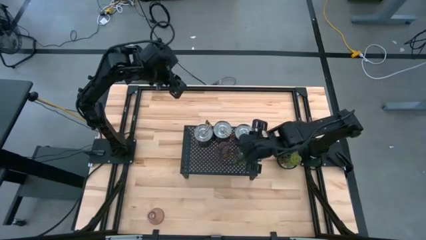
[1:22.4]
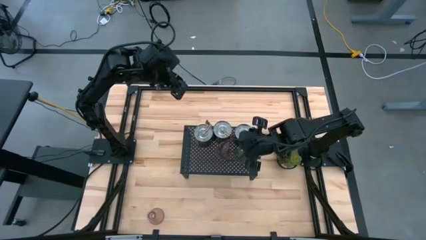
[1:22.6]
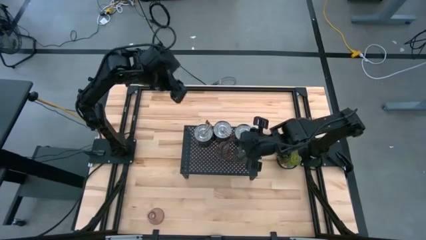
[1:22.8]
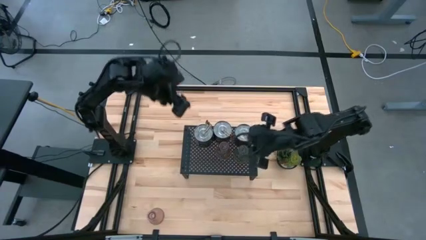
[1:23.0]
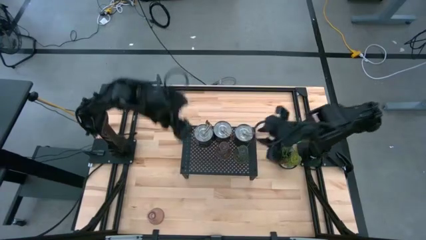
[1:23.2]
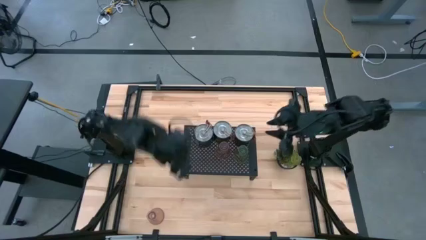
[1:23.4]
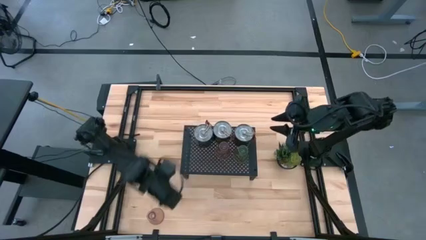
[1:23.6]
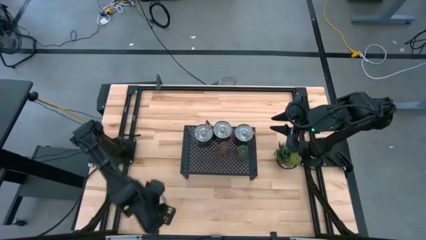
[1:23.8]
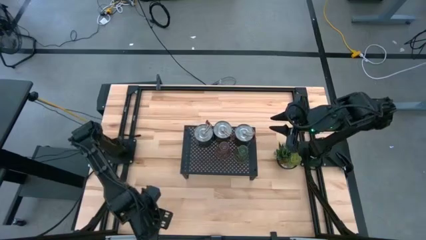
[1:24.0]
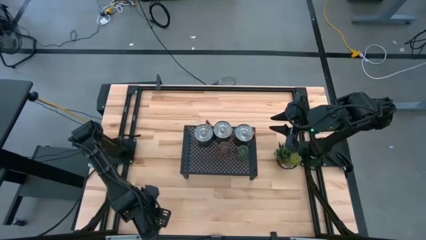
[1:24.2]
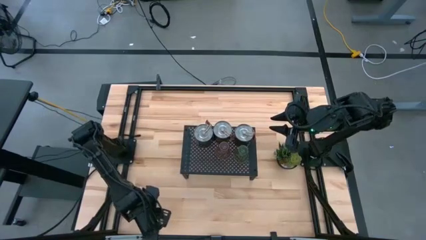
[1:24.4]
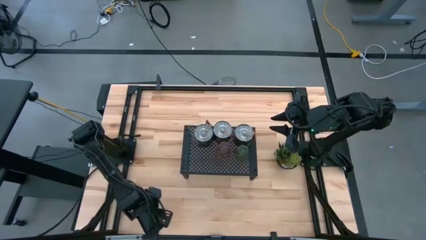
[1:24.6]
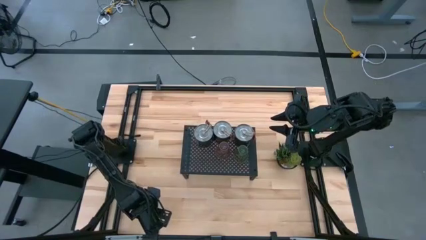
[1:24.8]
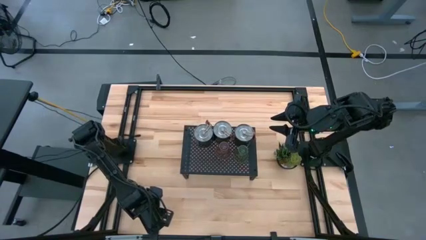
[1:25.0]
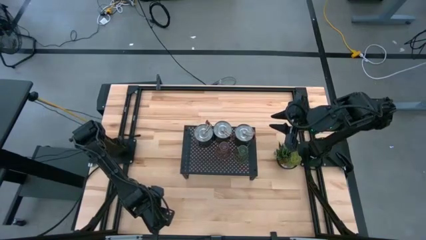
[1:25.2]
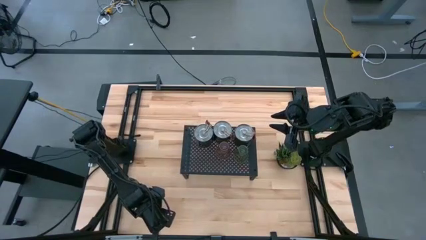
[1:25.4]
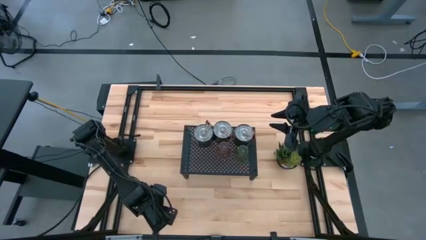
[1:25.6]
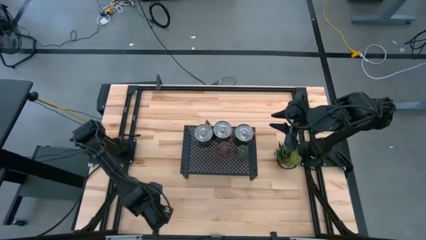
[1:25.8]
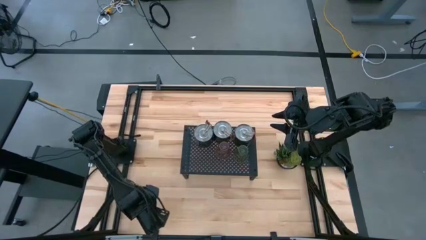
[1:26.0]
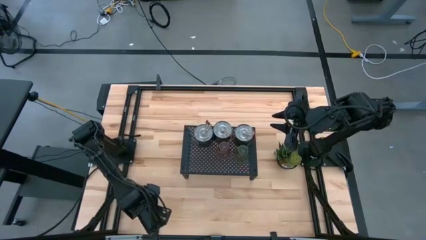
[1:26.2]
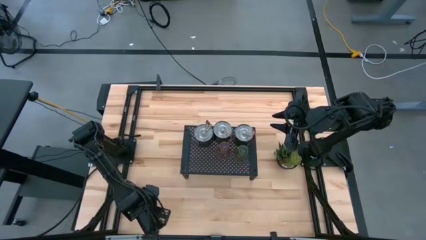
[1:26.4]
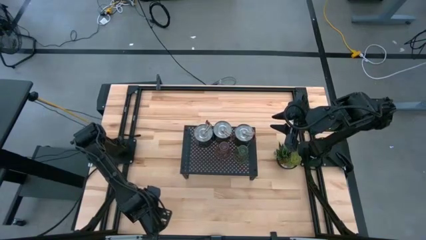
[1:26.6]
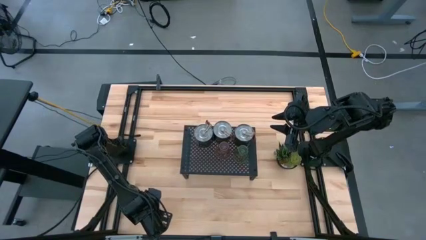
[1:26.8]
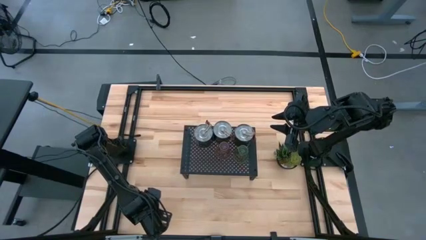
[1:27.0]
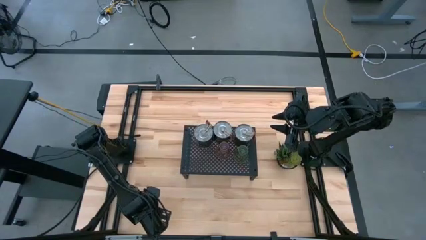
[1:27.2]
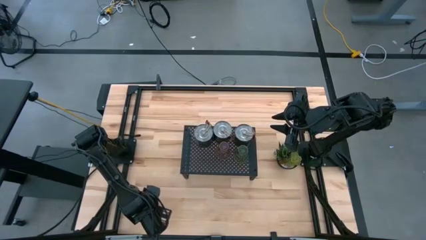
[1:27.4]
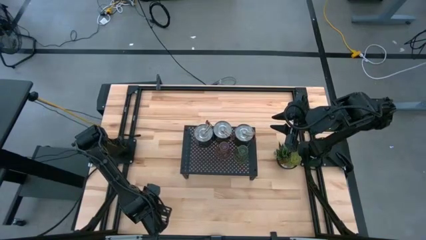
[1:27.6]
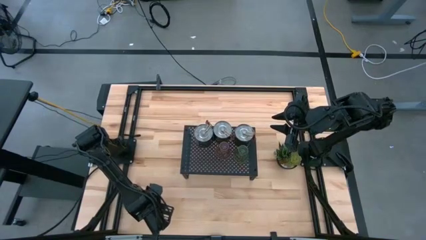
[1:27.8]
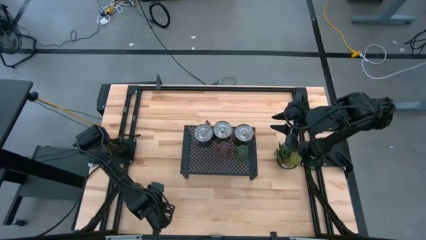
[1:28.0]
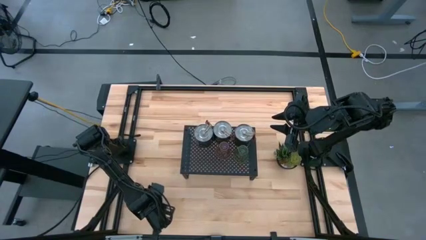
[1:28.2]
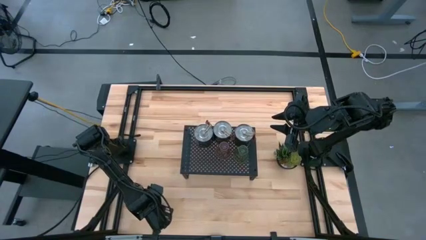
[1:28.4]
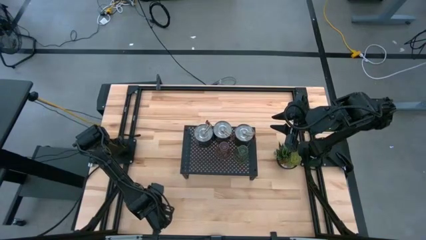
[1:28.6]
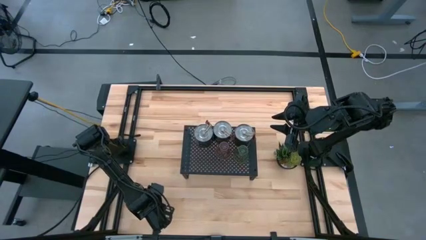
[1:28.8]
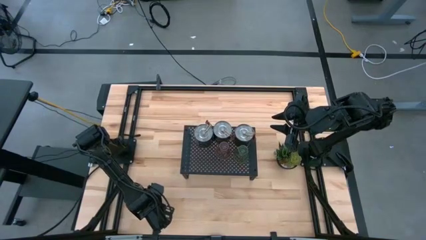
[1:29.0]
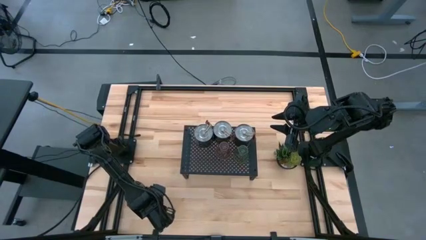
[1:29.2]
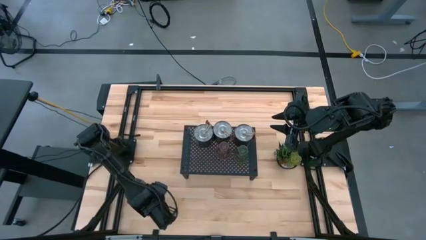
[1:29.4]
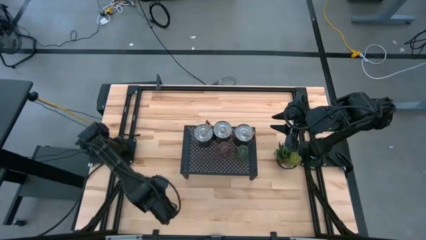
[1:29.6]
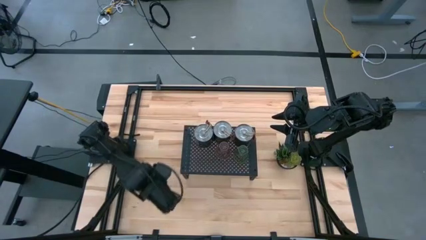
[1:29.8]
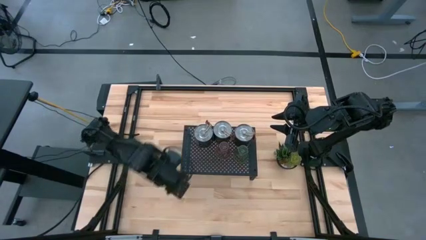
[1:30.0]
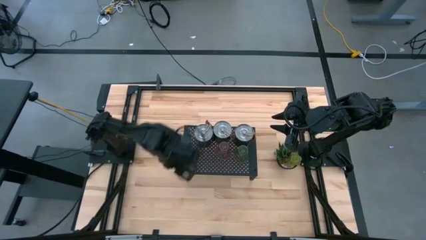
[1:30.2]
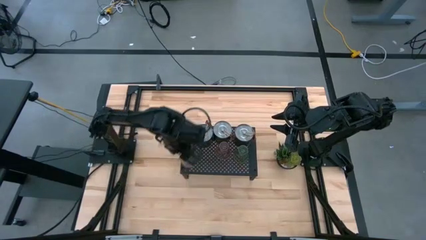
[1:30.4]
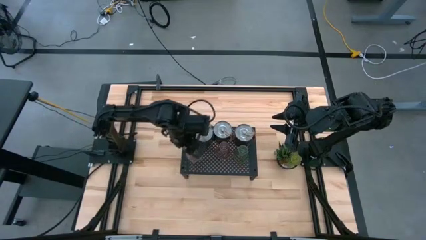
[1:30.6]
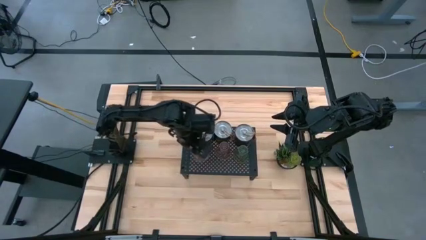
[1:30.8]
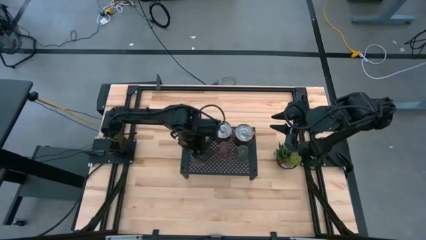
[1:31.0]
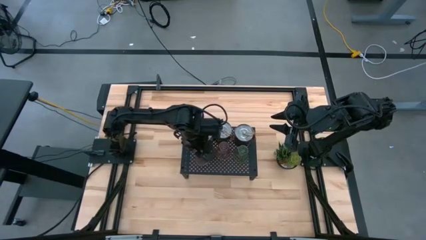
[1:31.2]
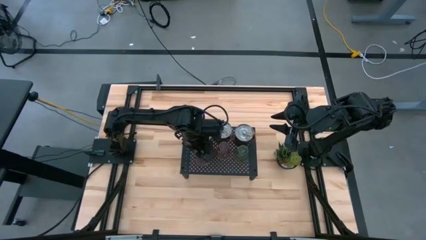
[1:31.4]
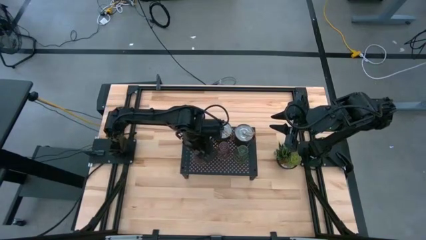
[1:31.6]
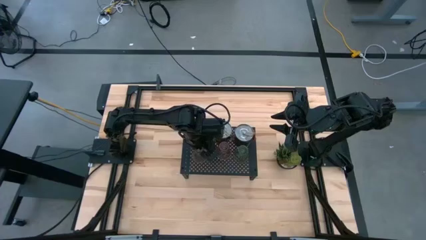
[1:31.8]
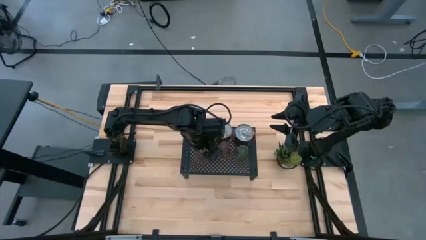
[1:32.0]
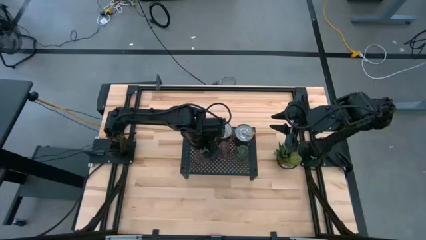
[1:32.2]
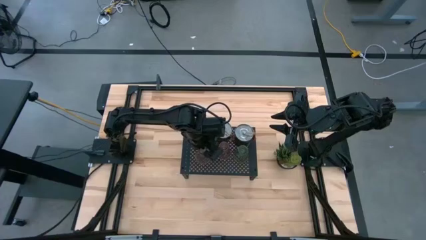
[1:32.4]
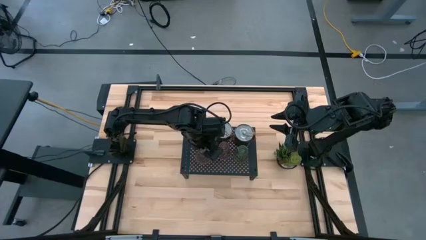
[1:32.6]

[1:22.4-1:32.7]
Task: Pick & Place candle stick holders
Put the pink glass candle holder on the shelf aligned with the other glass candle holder

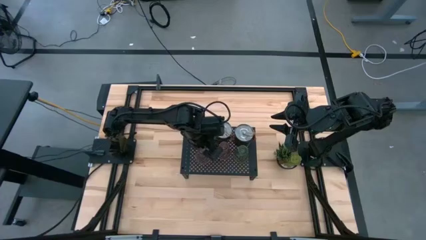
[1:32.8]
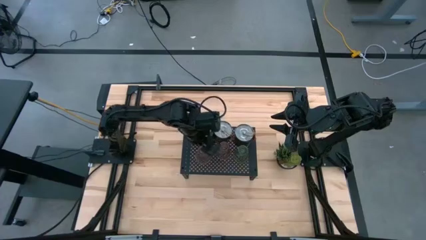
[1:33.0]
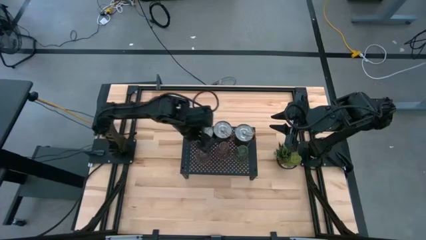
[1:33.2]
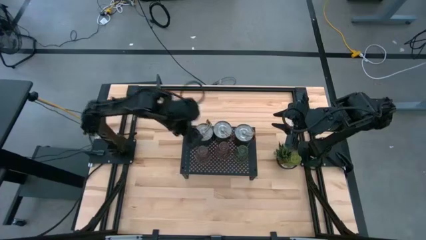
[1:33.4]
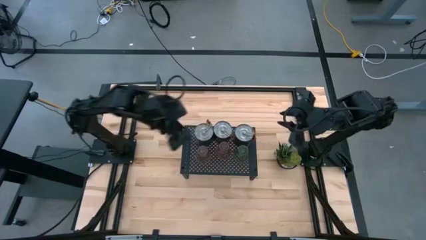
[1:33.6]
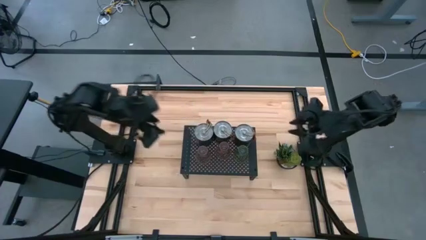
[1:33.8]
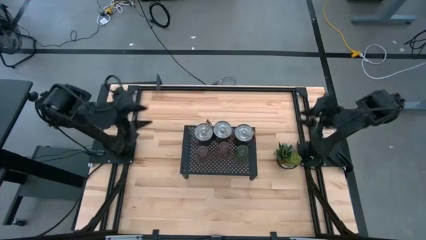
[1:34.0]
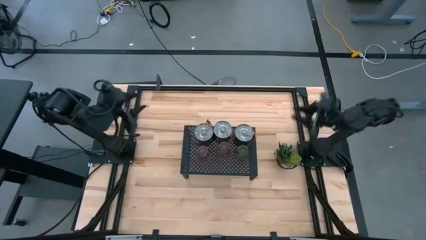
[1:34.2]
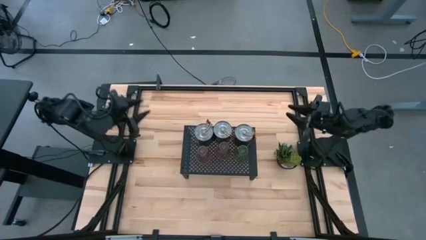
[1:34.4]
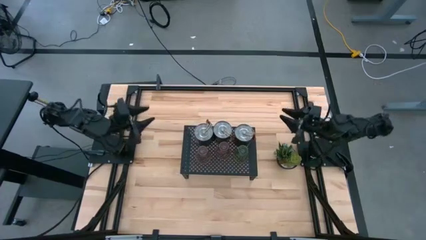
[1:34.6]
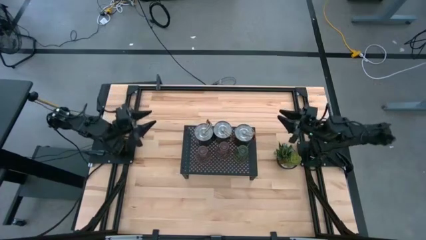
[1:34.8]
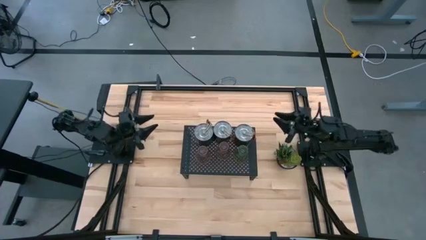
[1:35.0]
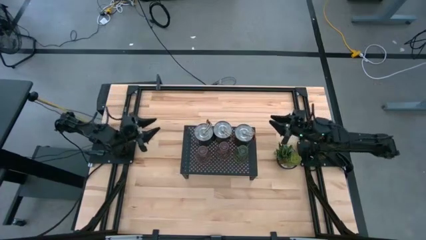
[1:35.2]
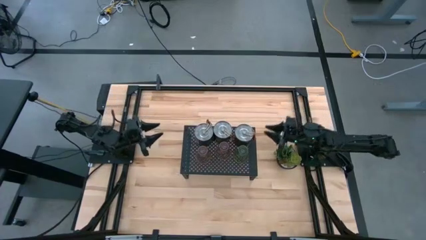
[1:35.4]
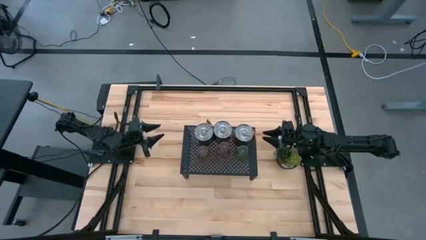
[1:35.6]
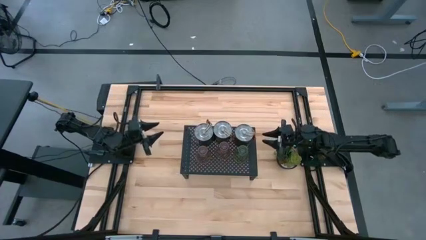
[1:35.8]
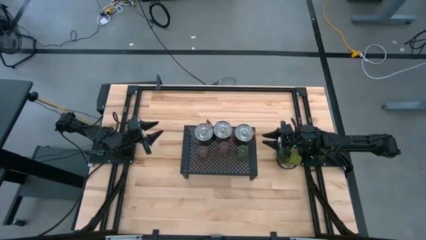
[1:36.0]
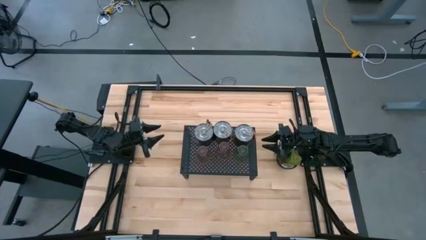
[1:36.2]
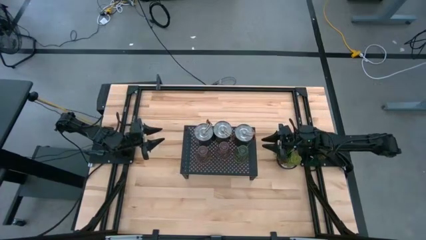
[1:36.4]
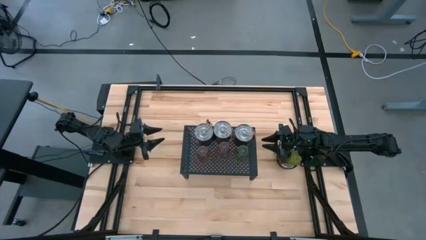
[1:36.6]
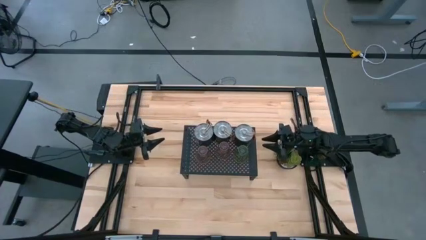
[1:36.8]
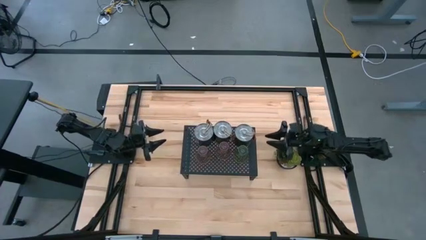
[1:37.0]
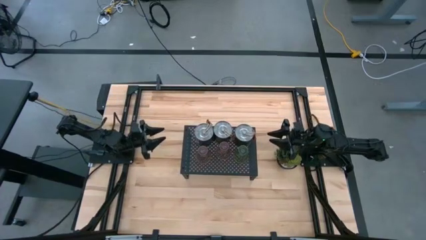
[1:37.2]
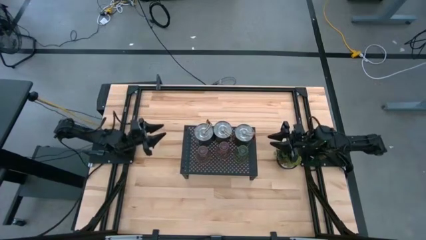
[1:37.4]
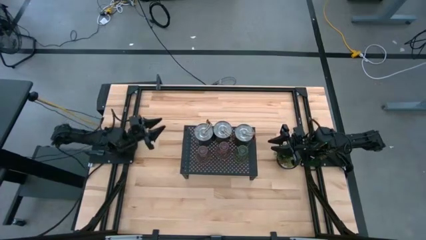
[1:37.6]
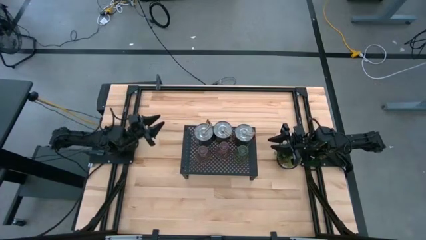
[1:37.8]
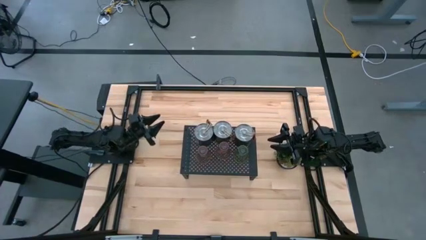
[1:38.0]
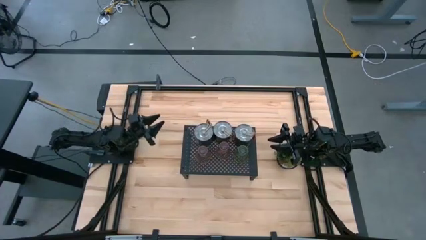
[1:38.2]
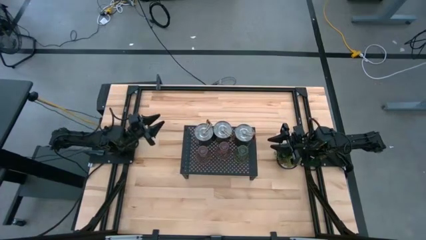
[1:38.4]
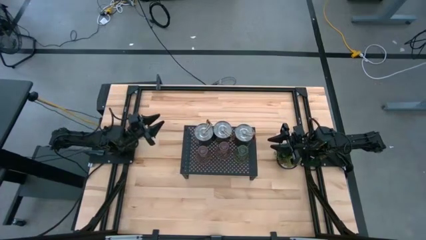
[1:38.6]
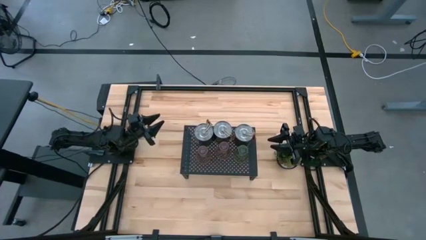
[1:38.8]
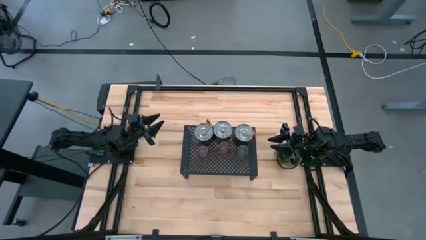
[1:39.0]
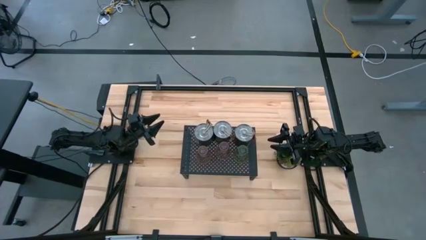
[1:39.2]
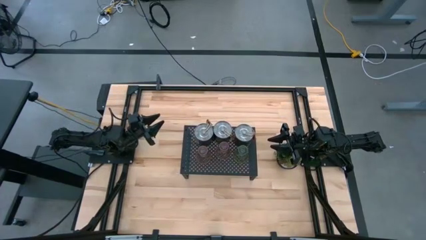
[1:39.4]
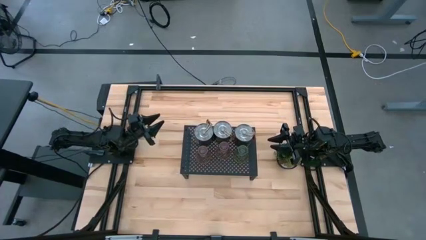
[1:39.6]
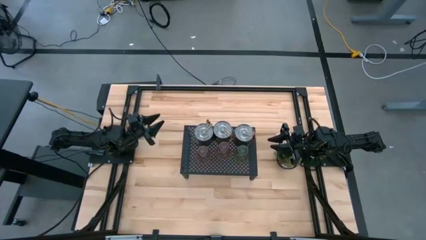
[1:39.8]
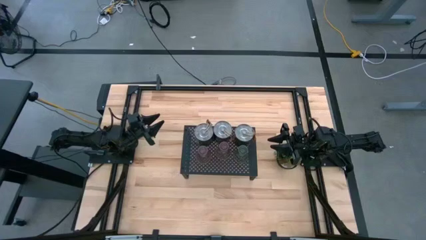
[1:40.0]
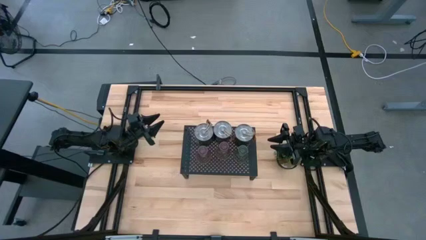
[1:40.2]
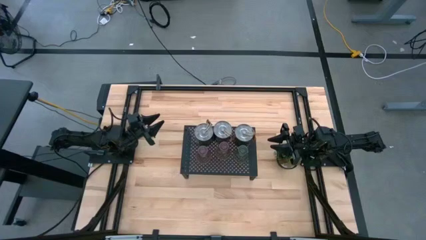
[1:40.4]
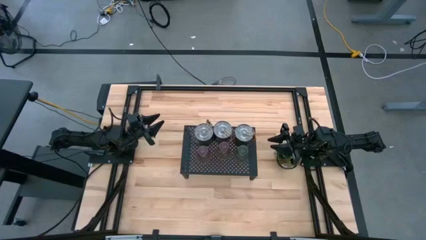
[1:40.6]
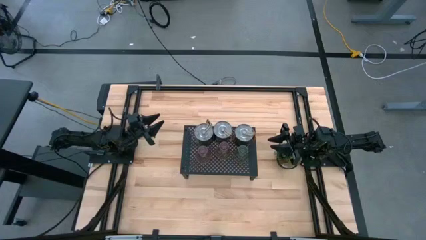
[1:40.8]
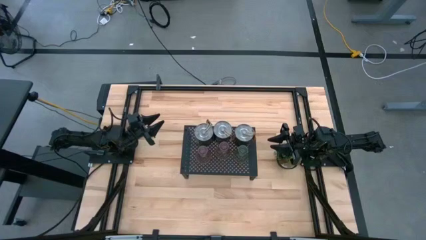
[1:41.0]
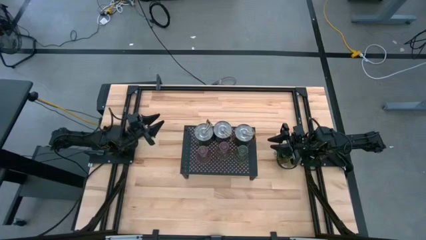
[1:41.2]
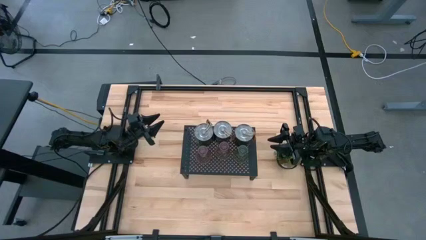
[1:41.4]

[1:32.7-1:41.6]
Return to Home Position
